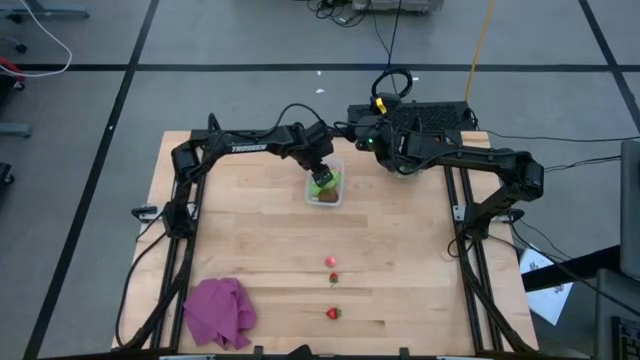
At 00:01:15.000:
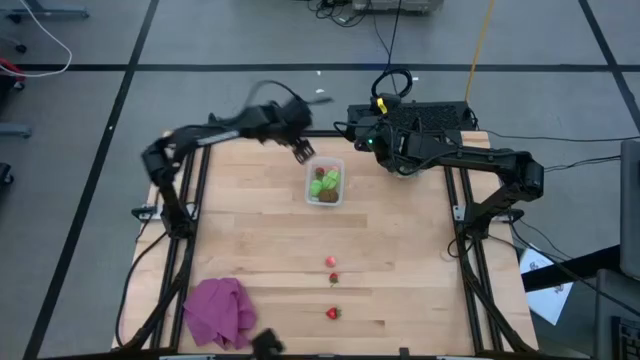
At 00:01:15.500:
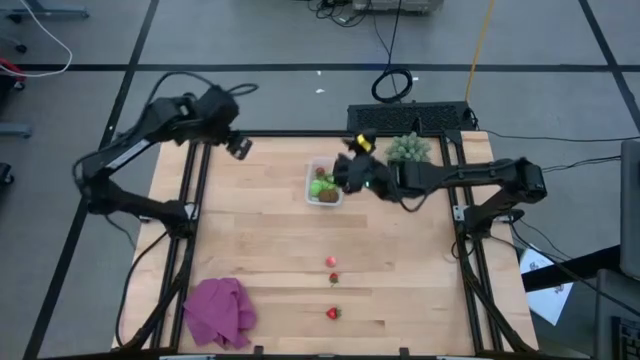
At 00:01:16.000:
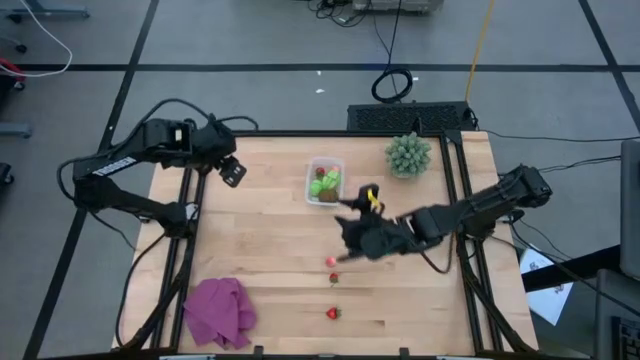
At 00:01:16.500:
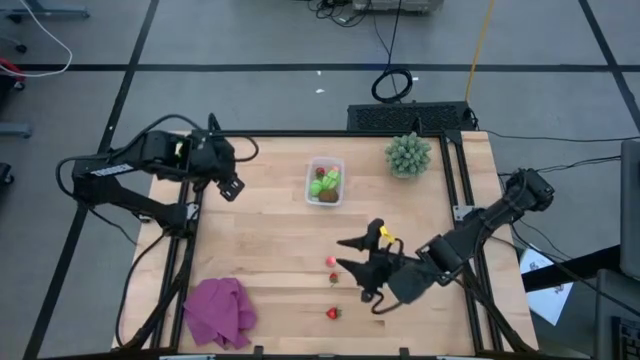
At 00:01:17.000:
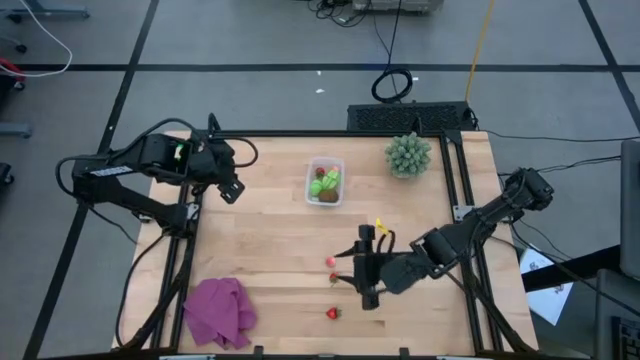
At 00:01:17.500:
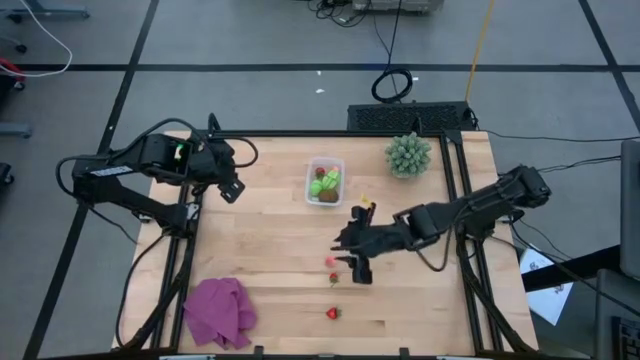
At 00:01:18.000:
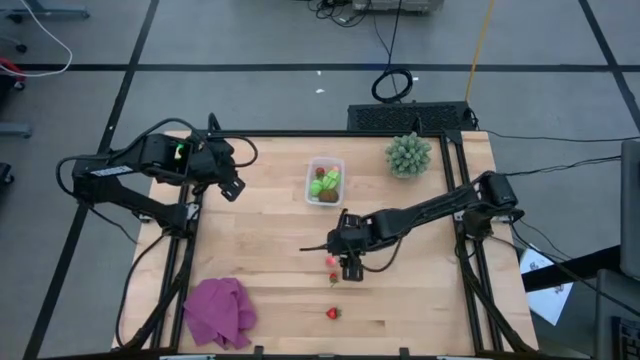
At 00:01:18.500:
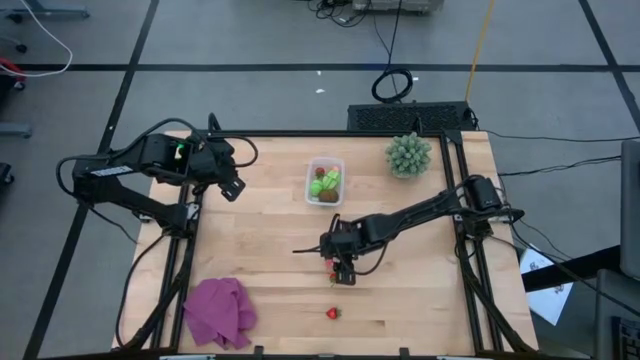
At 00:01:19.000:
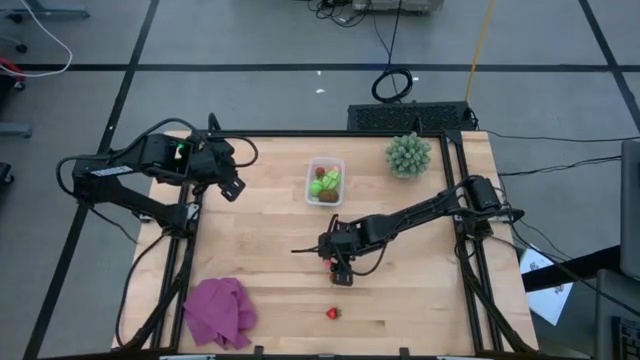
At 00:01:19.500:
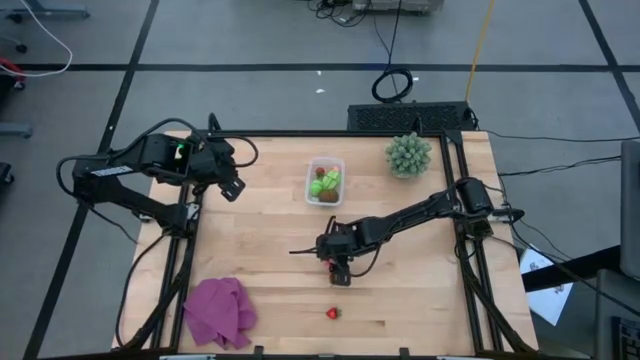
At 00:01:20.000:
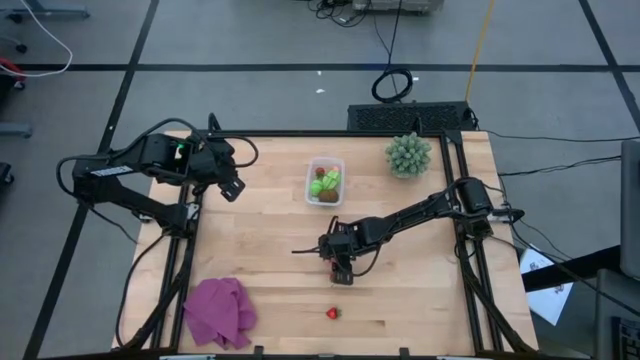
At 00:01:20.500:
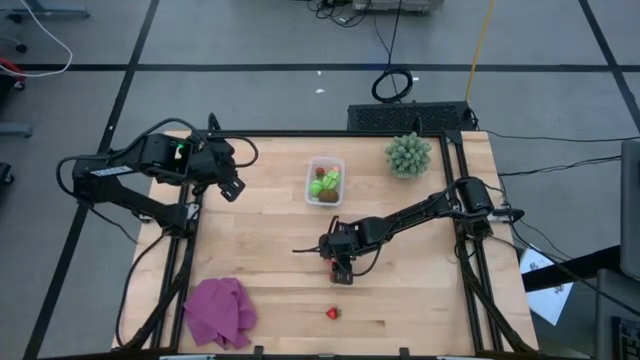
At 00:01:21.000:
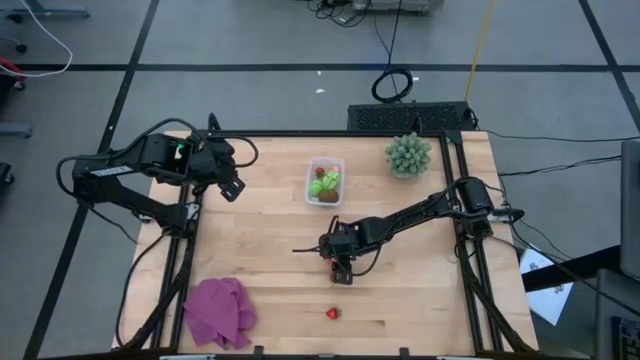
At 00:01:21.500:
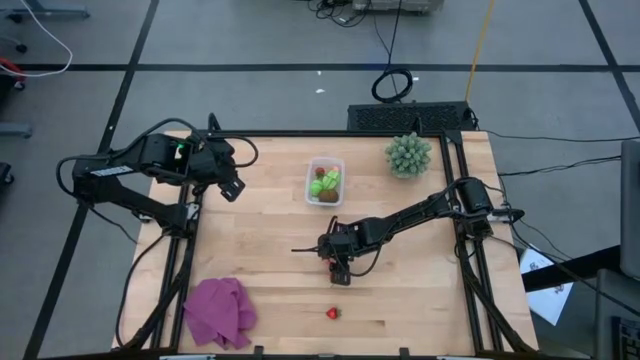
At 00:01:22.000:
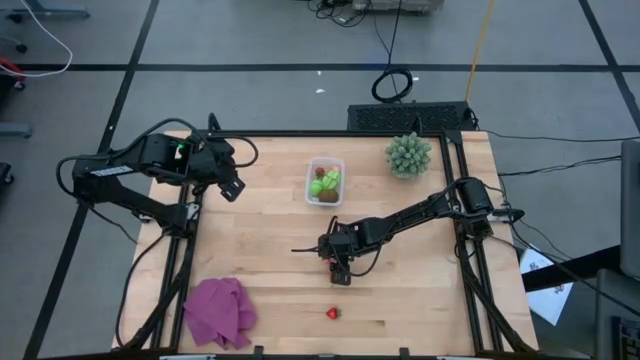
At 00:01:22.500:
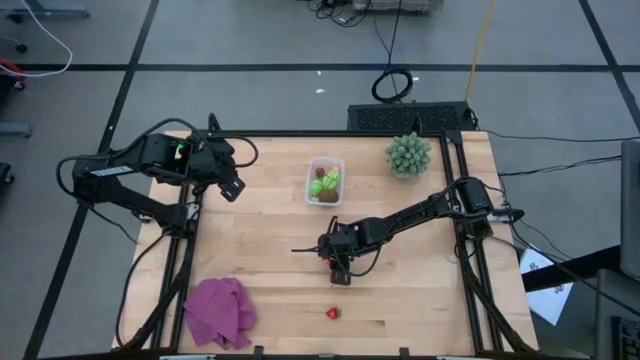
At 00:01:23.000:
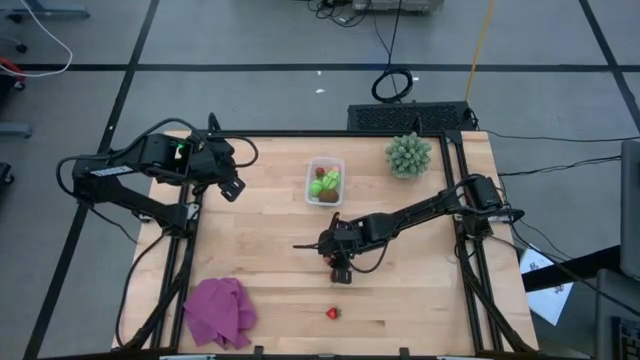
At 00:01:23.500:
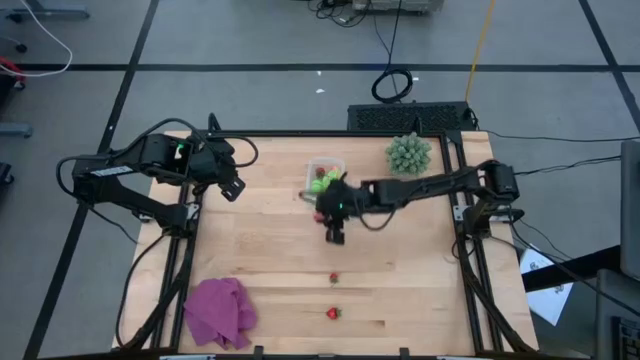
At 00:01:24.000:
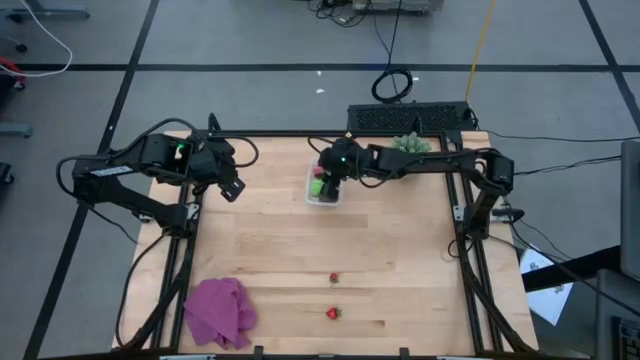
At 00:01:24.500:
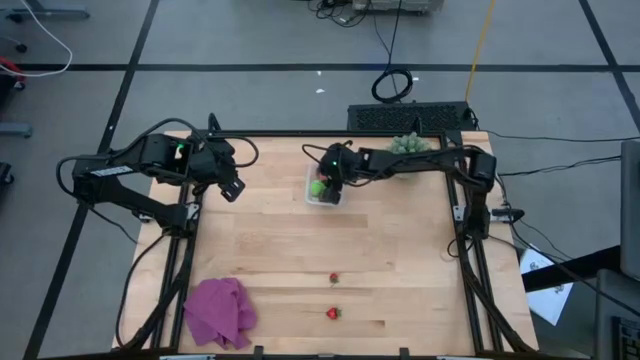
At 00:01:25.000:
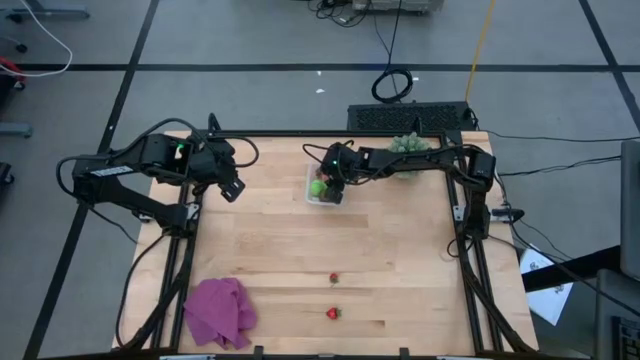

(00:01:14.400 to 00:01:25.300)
Task: Pick and placing Produce into tupperware
Put the peach into the transparent bin

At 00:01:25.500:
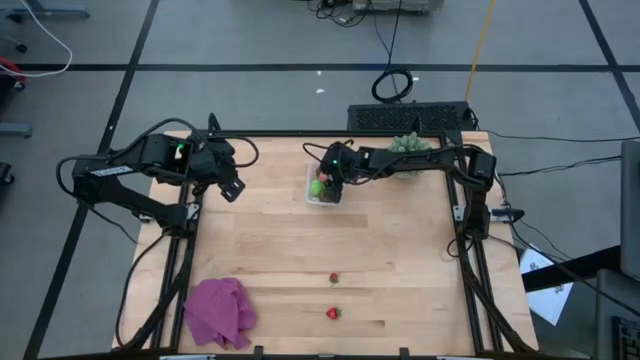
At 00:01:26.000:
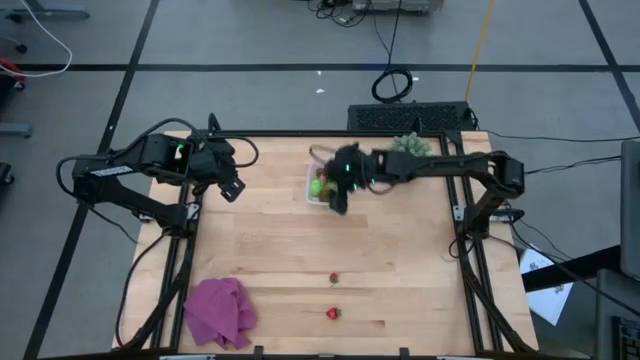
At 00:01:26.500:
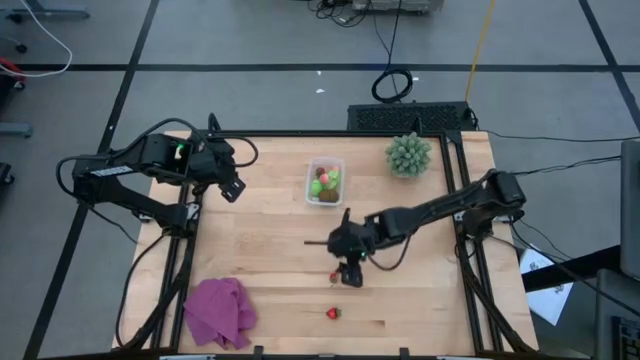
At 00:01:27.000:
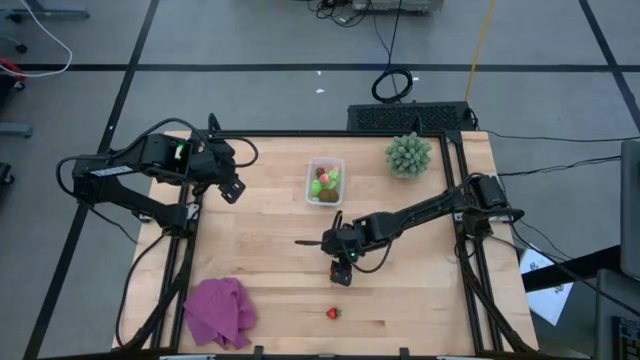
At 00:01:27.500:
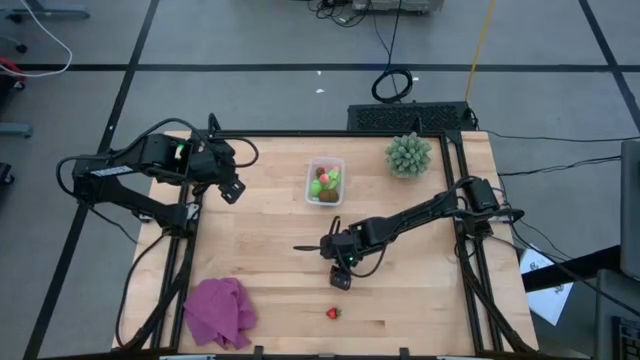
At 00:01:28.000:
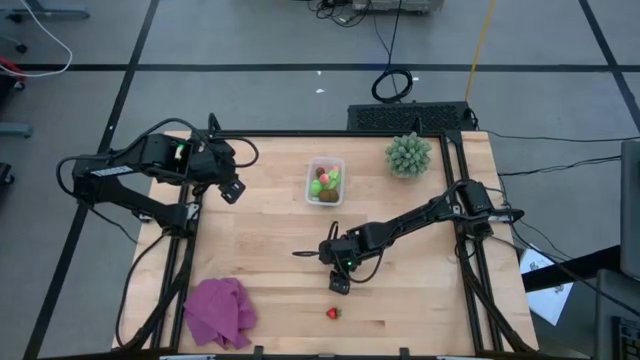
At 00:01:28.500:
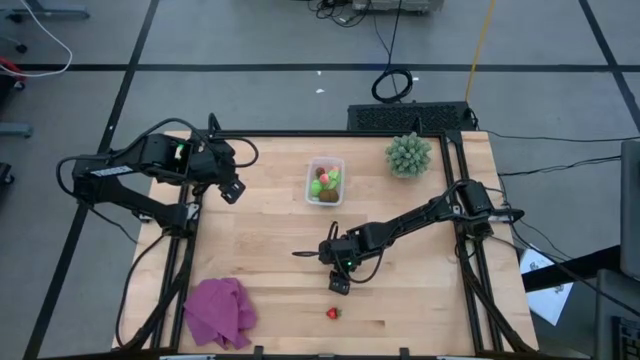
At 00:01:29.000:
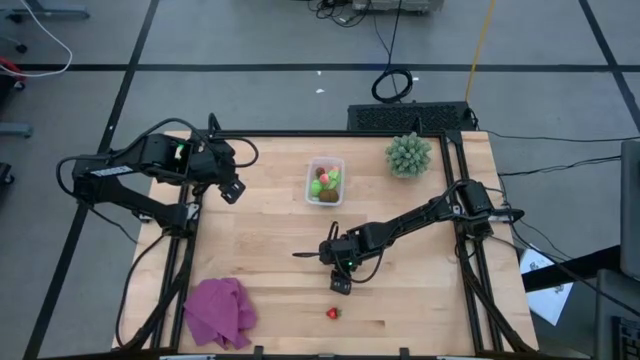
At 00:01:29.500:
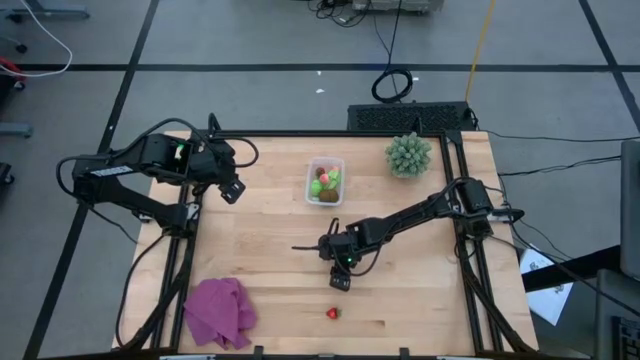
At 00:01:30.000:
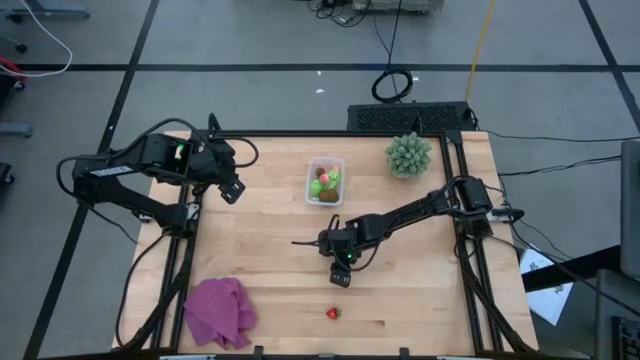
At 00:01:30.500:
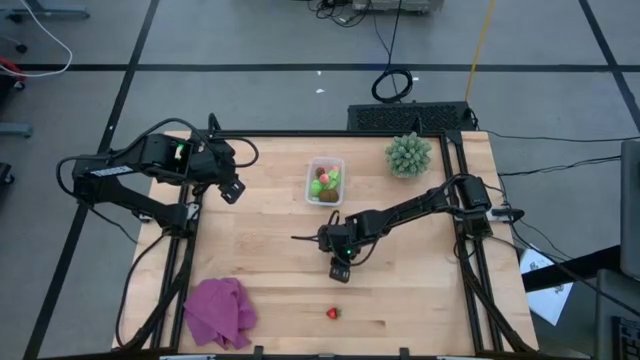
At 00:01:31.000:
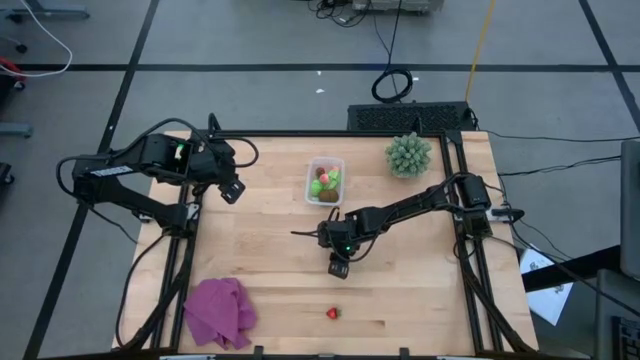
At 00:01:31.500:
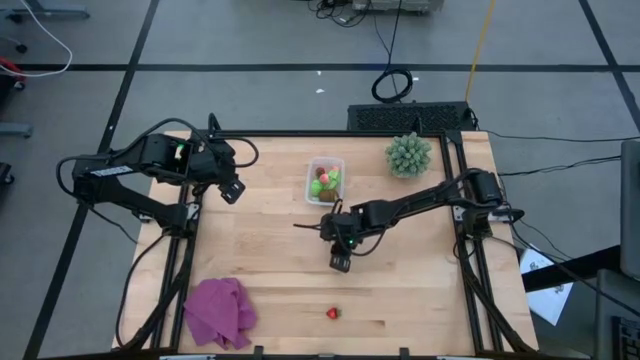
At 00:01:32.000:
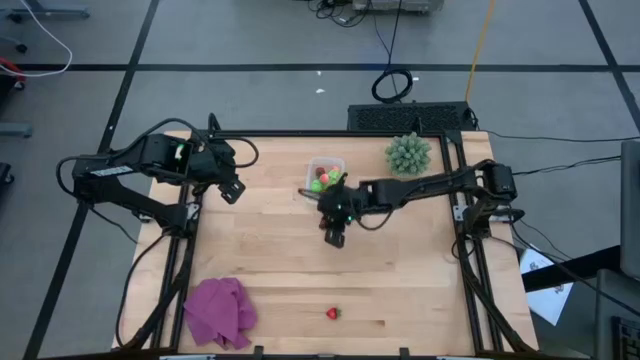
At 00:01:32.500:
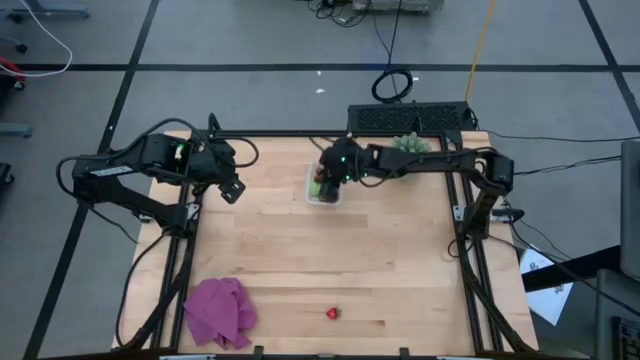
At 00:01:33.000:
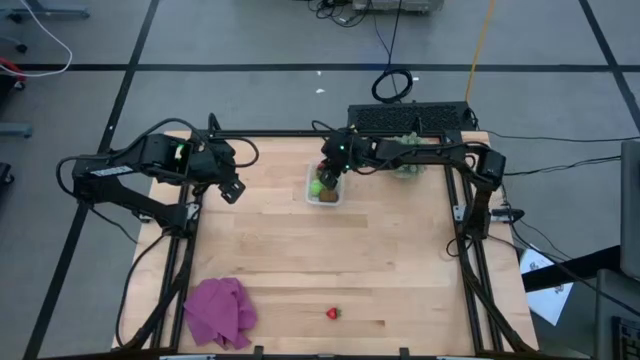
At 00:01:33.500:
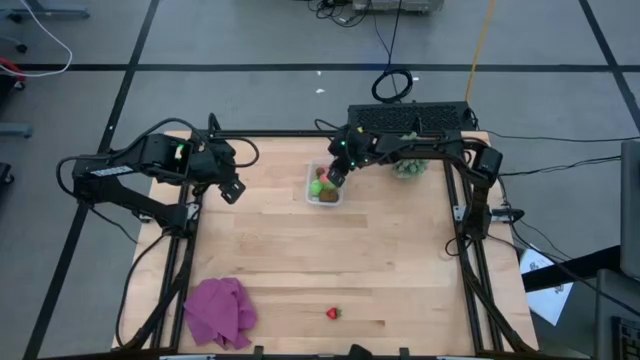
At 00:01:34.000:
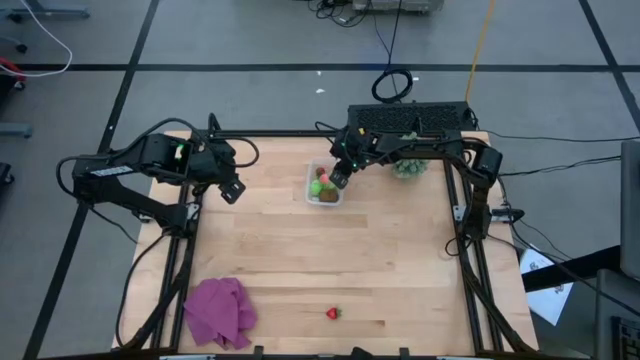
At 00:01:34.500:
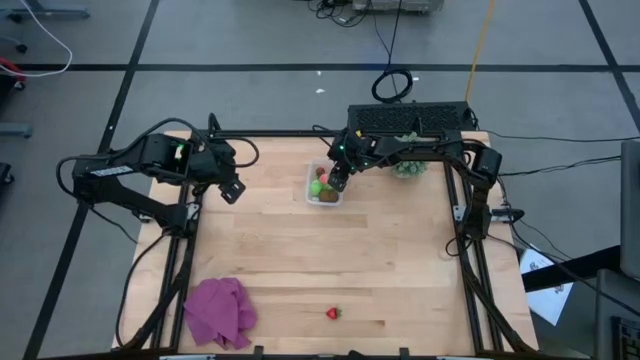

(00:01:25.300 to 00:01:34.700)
Put the top strawberry into the transparent bin

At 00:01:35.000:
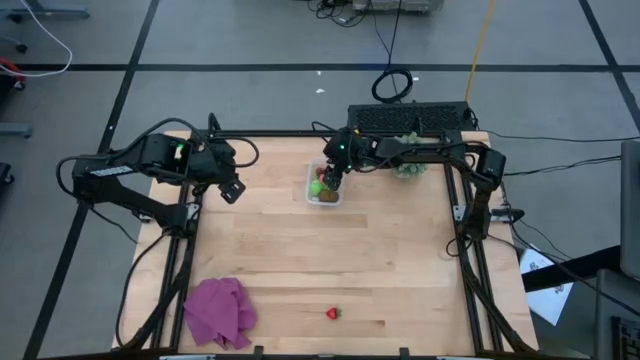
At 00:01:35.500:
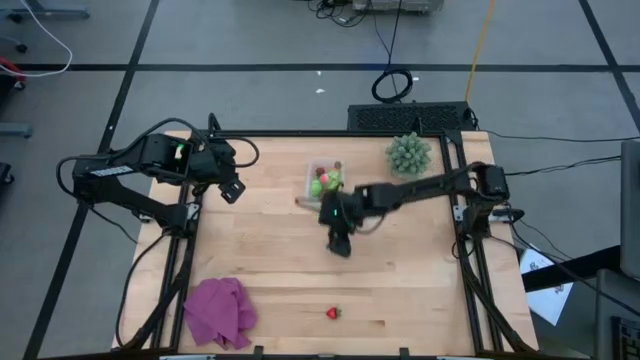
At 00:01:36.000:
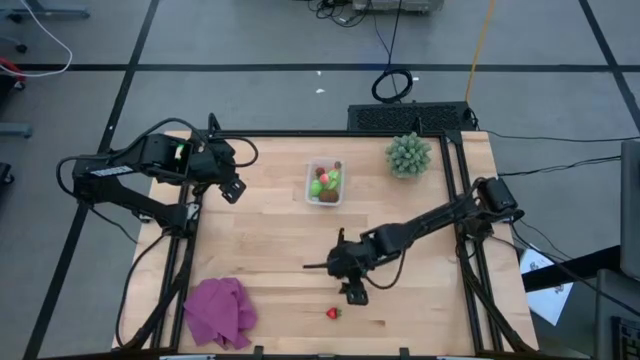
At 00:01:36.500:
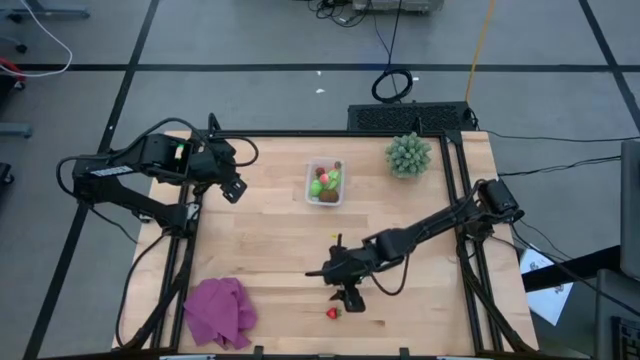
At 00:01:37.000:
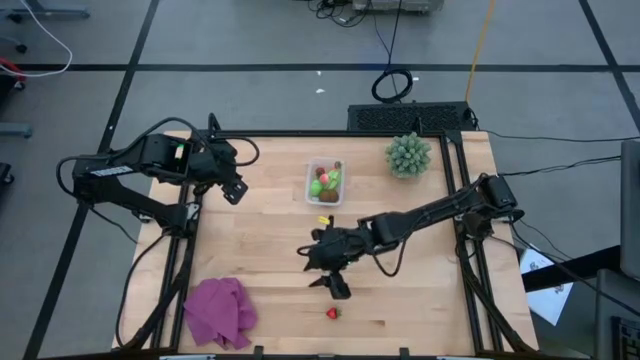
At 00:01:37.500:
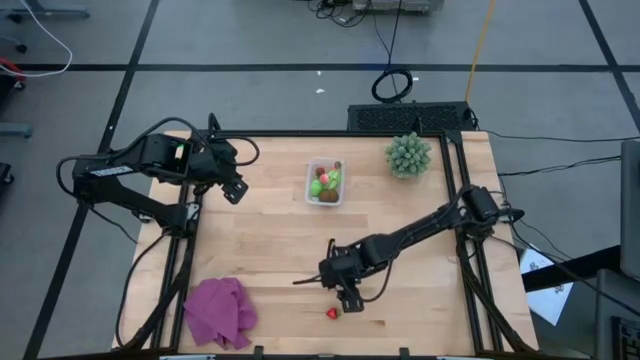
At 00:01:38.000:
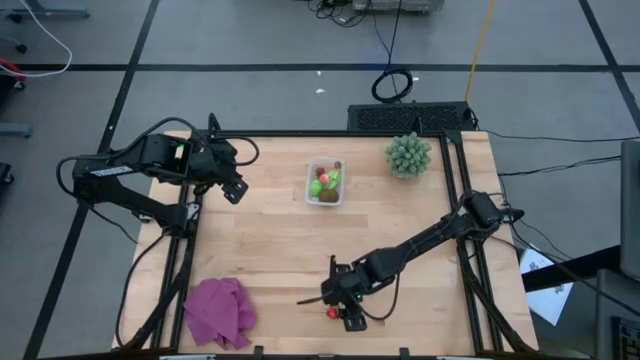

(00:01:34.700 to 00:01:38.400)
Put the strawberry into the transparent bin
